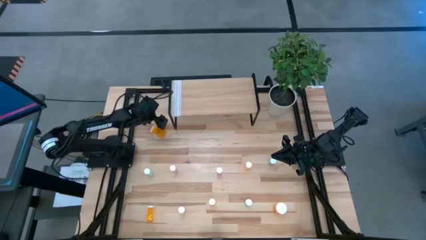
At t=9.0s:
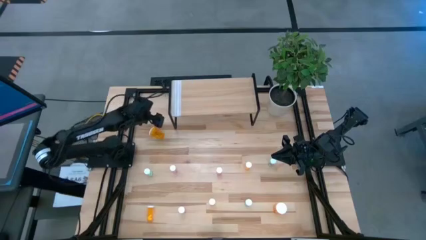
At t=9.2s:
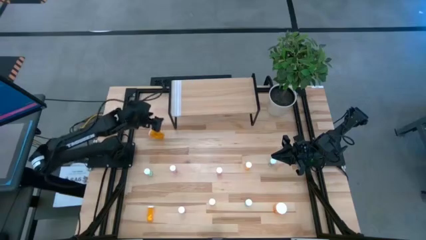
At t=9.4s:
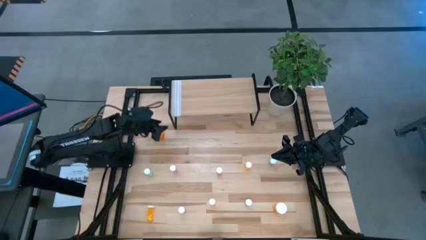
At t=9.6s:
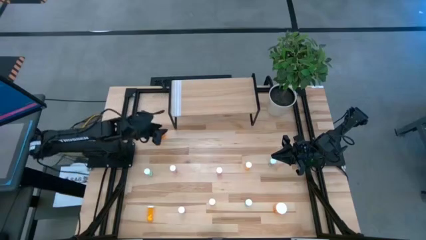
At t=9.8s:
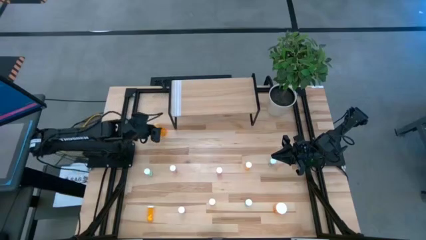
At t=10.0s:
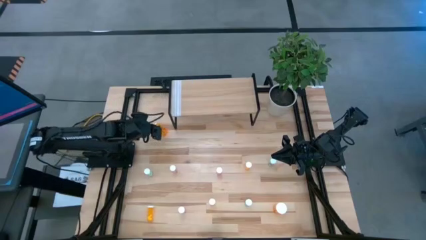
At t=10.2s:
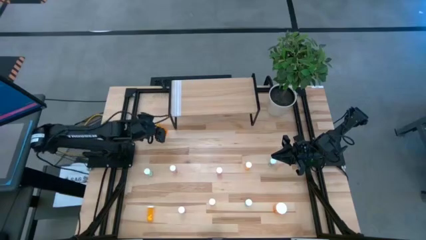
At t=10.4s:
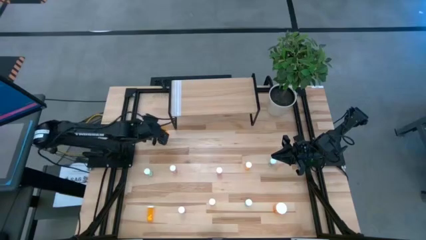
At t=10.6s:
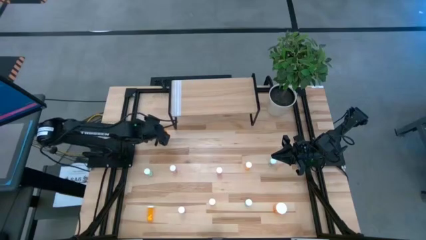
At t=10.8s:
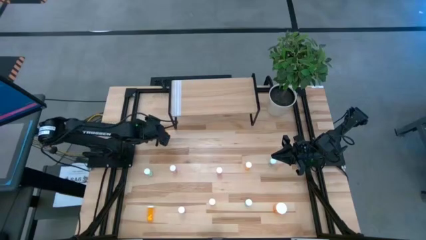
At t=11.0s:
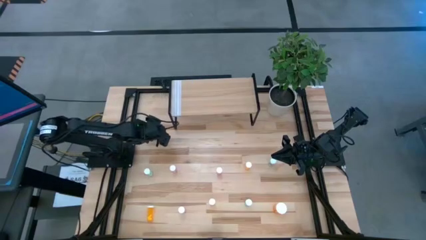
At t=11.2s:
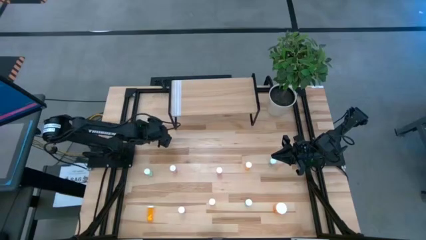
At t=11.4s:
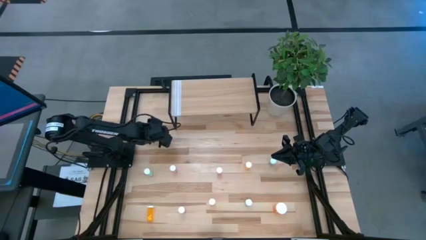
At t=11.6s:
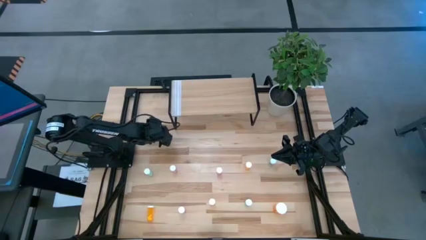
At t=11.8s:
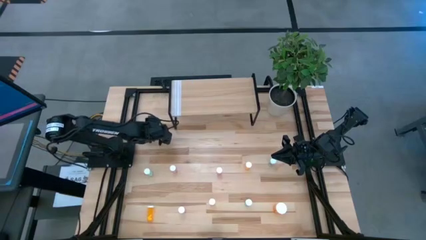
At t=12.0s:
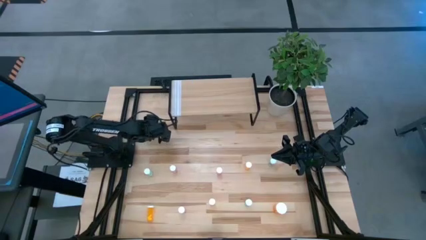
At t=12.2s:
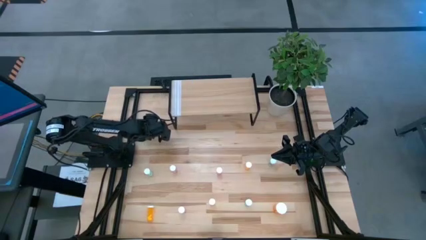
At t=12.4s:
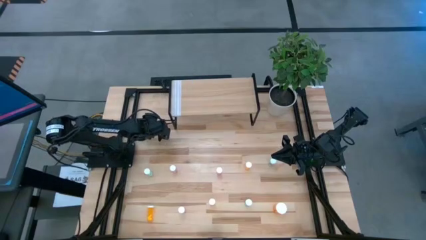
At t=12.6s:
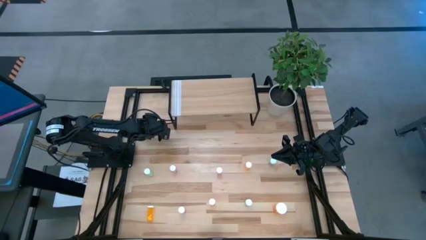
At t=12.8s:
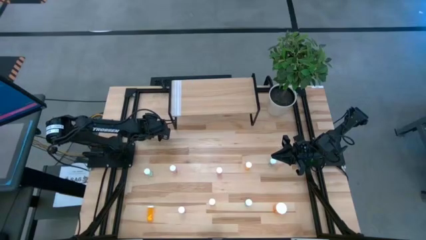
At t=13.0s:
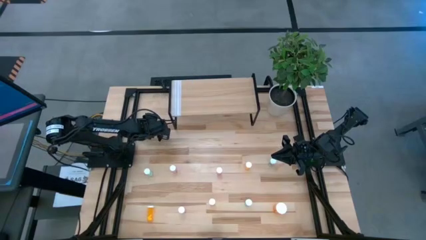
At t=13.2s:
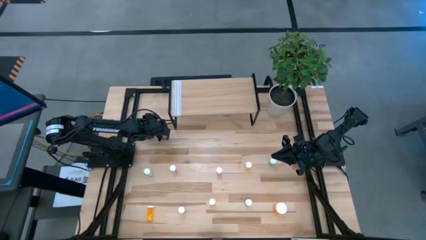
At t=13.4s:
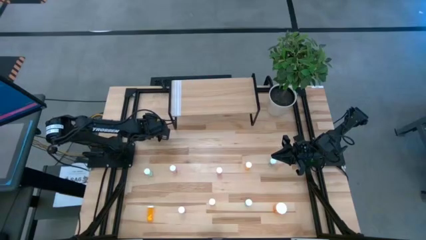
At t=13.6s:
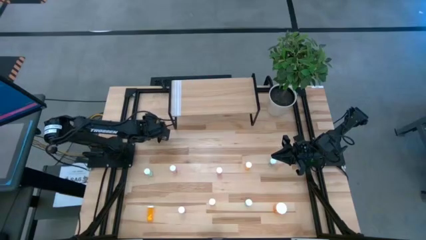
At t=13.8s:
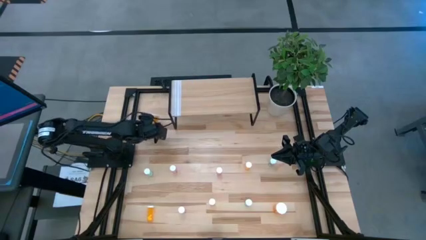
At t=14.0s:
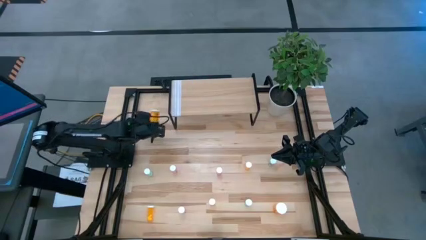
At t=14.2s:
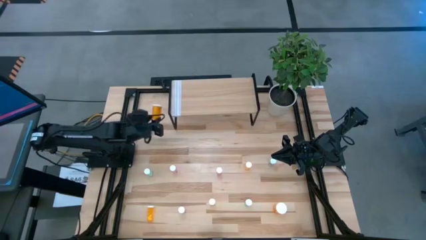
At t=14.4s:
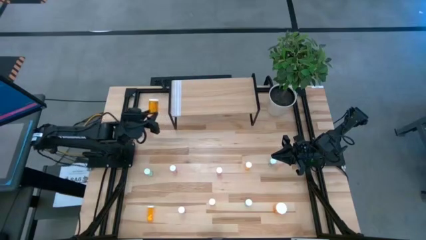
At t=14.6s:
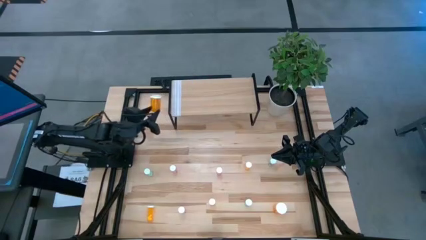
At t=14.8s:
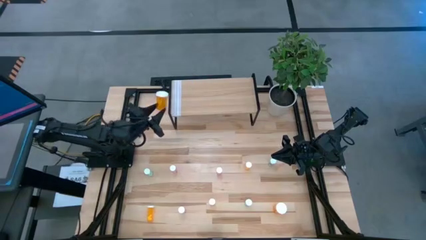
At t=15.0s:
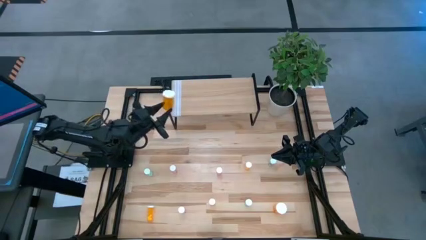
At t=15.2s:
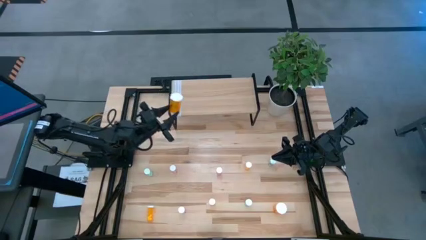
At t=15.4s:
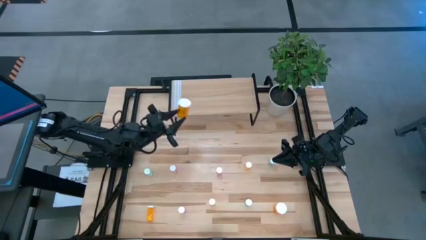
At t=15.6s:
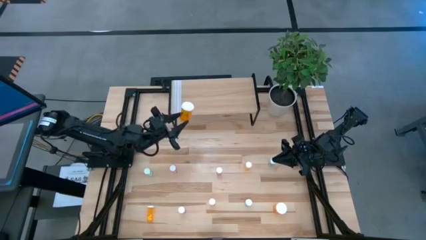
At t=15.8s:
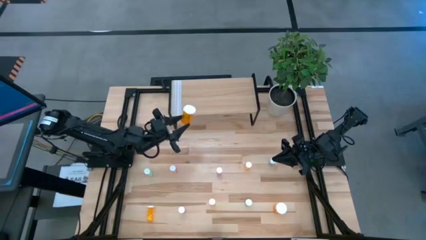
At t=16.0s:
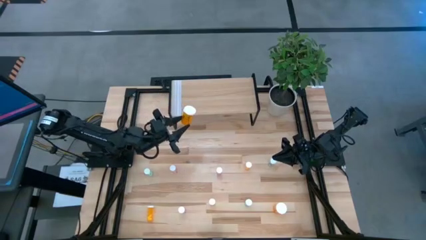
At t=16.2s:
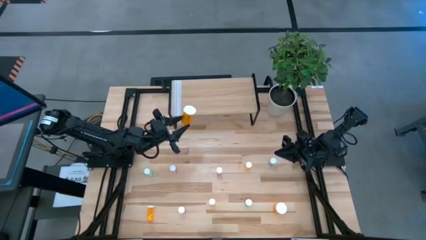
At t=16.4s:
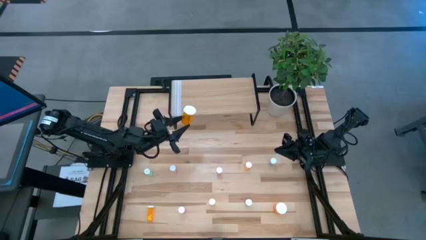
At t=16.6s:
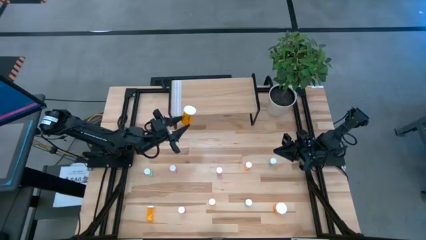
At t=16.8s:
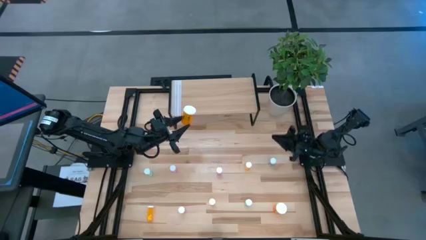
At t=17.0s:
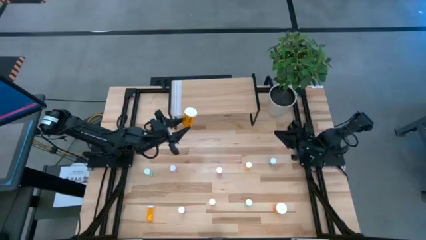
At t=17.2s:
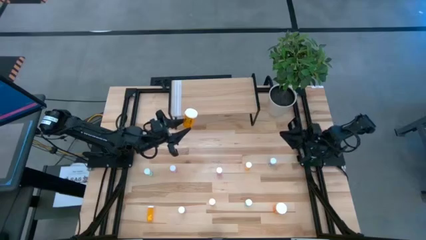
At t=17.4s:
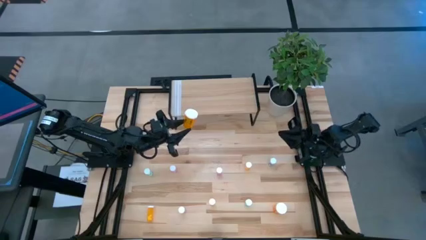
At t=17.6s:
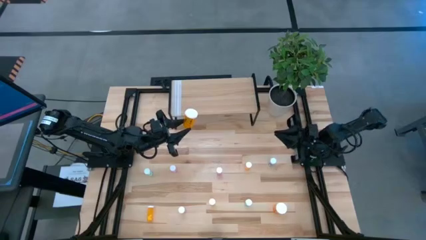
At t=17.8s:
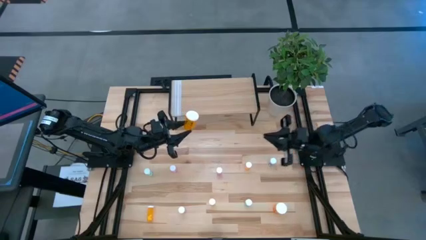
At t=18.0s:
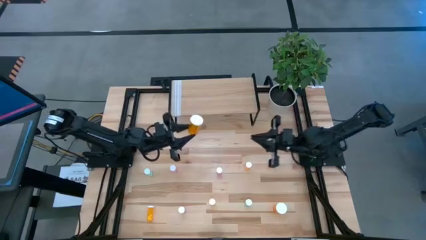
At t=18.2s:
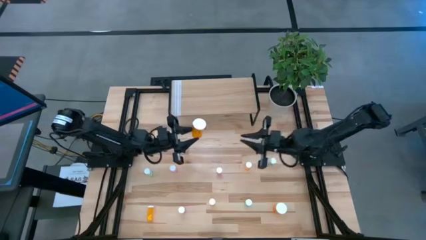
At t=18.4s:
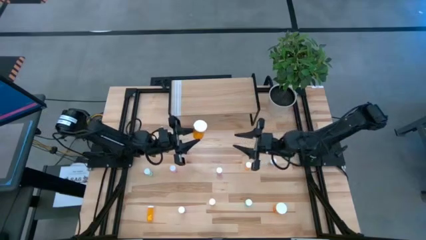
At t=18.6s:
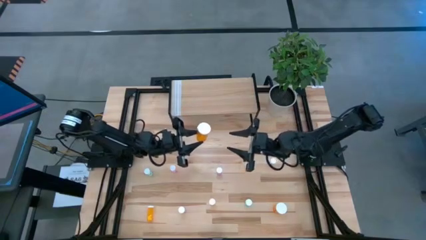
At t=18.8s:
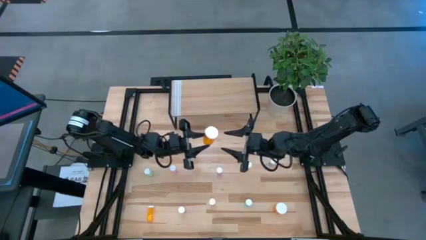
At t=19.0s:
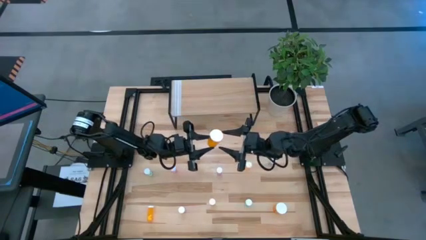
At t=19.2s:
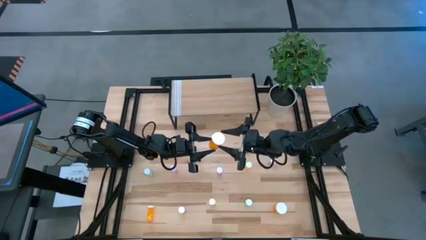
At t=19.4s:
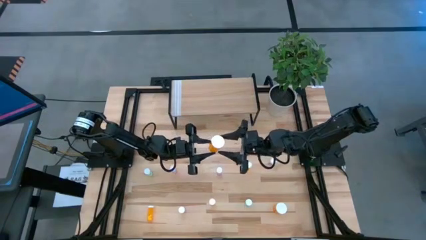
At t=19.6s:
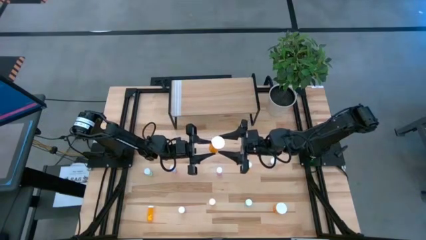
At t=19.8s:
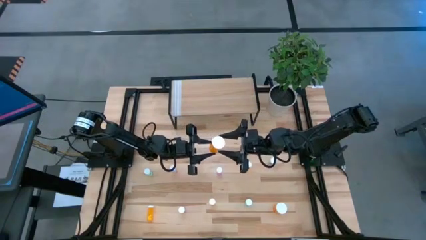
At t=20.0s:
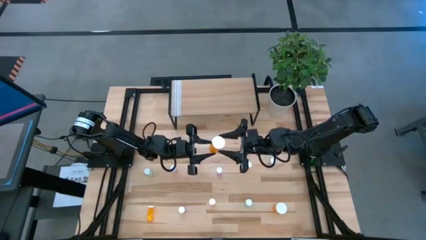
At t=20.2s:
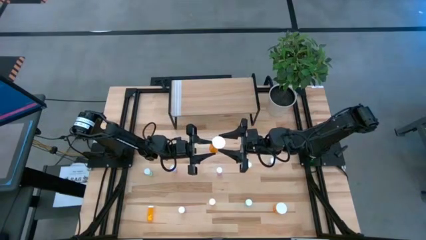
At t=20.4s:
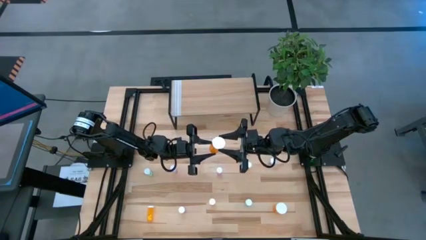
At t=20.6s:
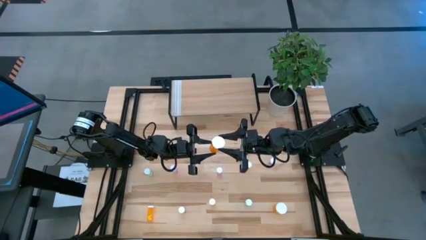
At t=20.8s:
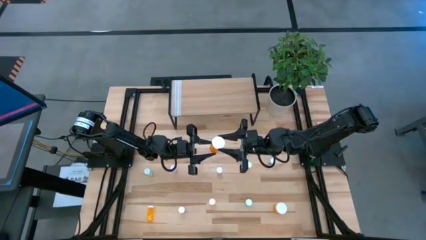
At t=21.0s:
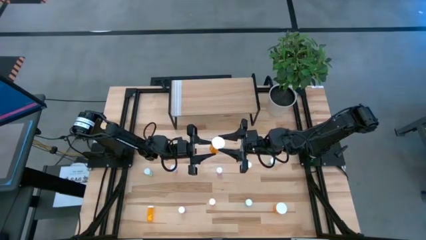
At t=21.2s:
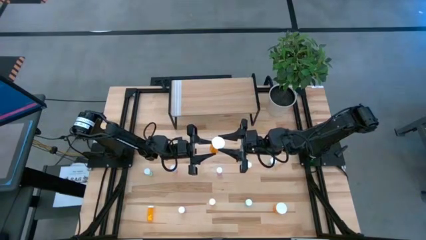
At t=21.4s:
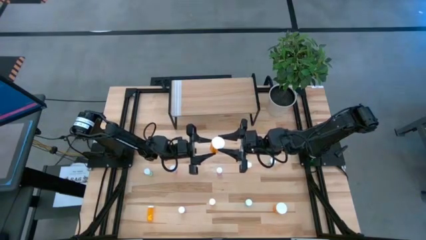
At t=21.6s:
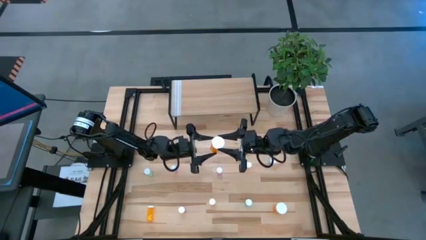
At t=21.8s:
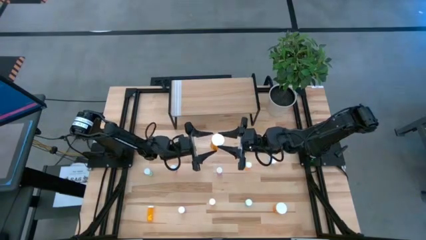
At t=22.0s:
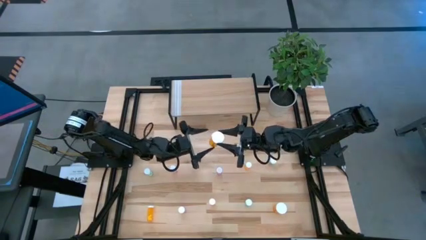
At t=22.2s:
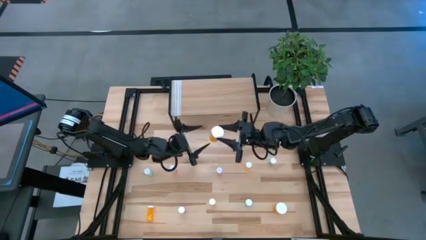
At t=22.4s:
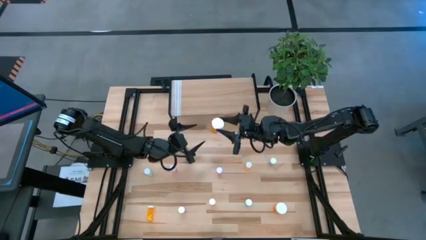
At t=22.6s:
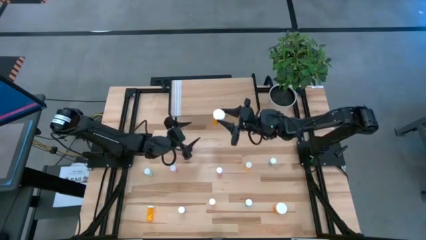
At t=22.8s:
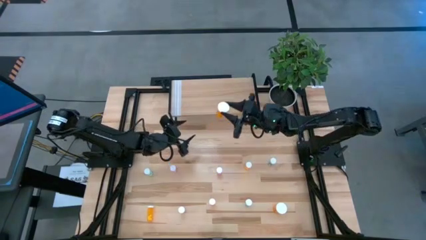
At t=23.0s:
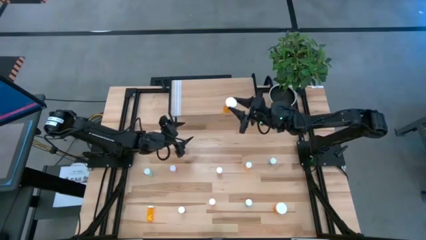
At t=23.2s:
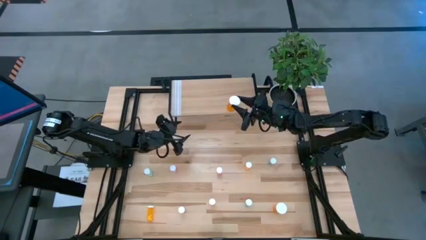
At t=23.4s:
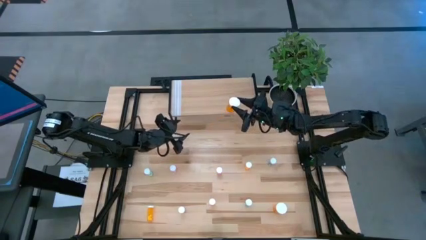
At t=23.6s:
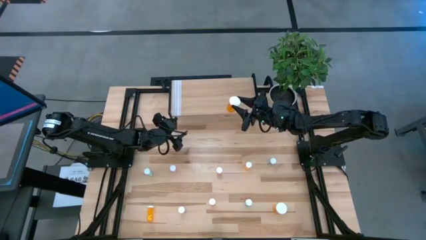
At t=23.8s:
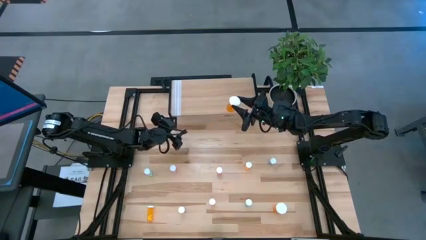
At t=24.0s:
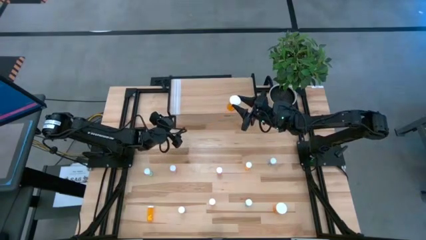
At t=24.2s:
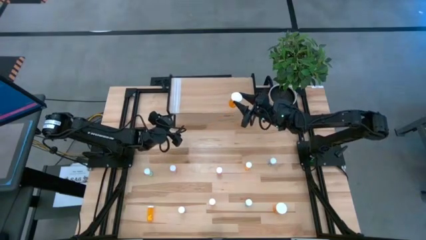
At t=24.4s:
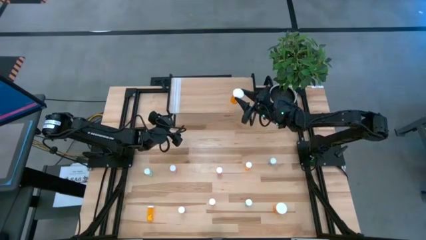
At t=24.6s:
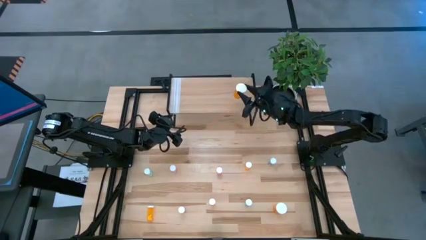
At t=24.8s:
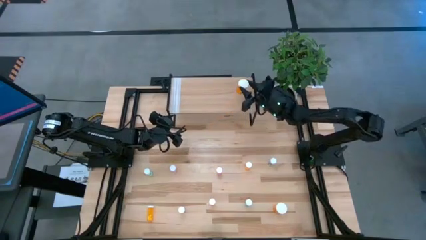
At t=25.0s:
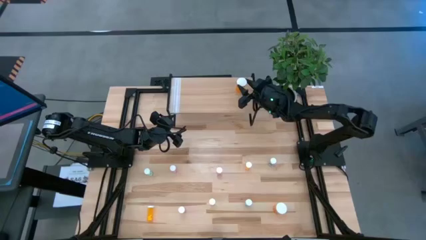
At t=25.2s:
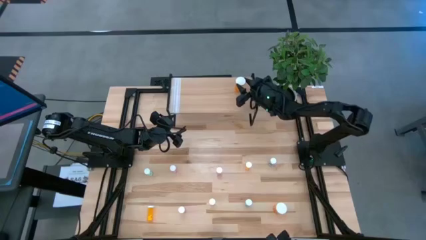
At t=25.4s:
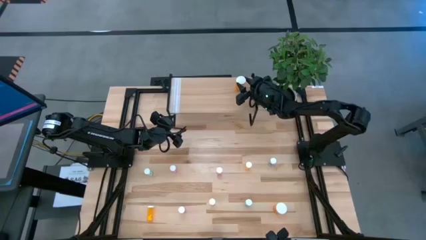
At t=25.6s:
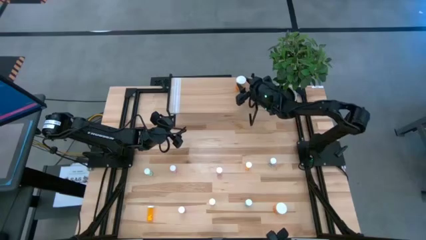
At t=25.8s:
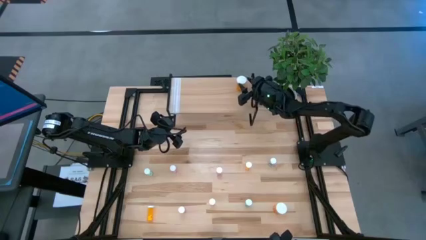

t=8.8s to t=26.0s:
Task: Pick and place medicine bottles onto shelf by color
Put the top large orange pill bottle on the shelf
